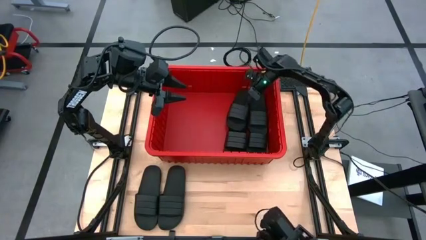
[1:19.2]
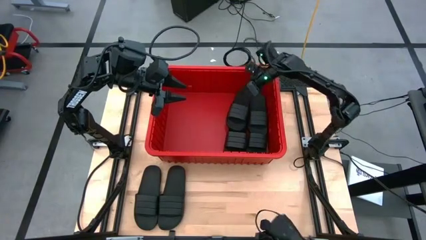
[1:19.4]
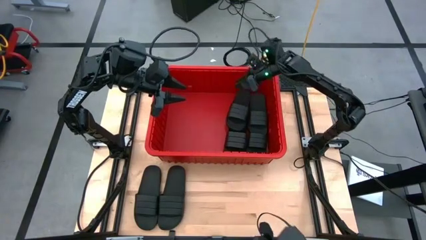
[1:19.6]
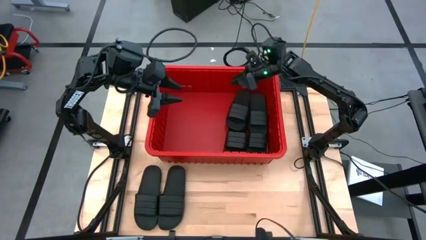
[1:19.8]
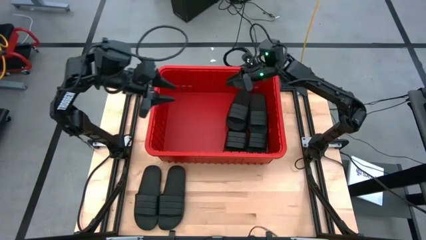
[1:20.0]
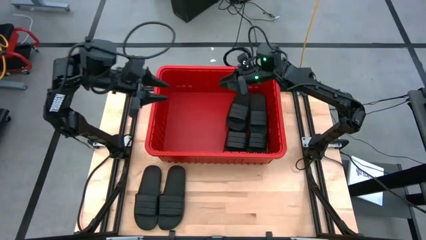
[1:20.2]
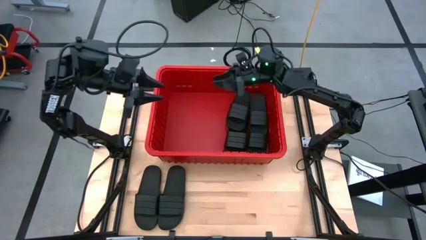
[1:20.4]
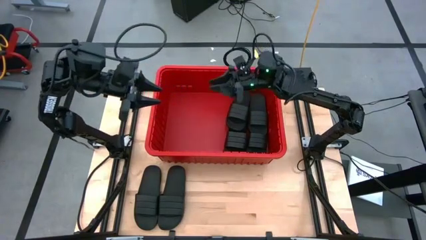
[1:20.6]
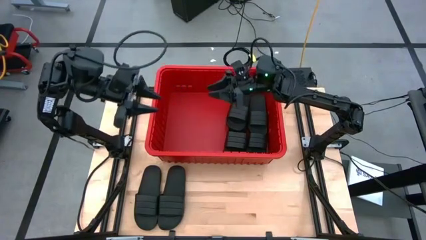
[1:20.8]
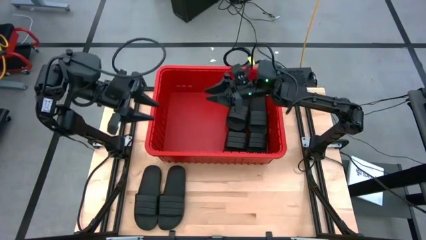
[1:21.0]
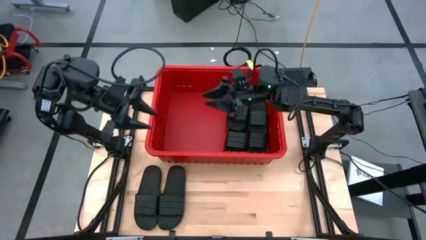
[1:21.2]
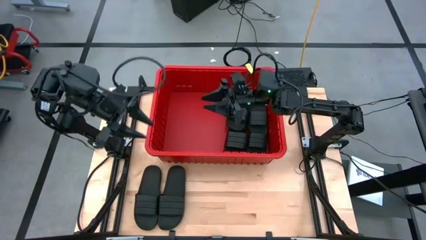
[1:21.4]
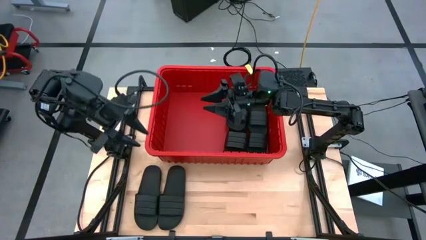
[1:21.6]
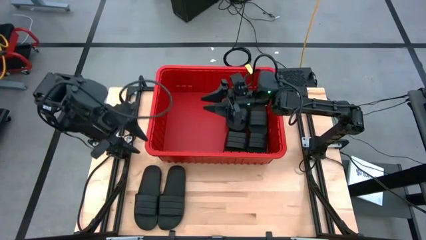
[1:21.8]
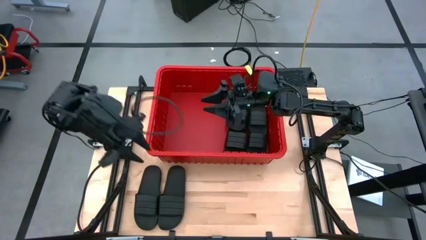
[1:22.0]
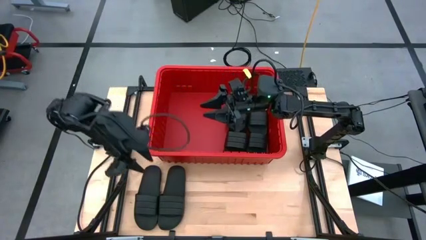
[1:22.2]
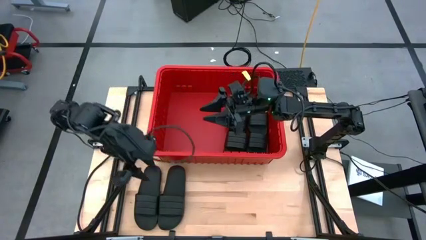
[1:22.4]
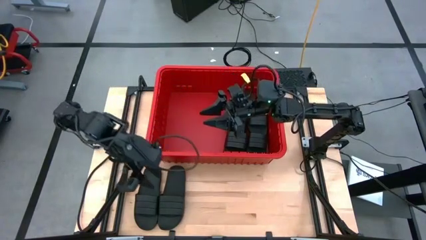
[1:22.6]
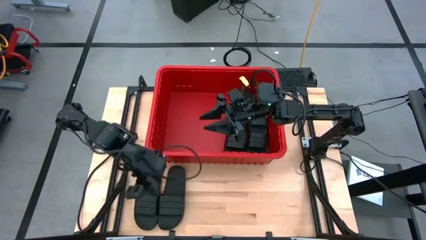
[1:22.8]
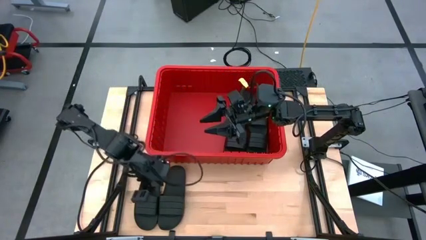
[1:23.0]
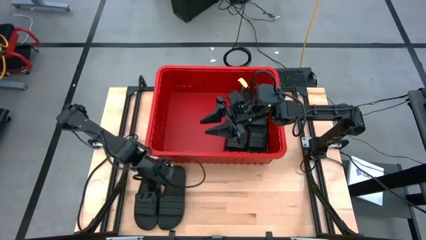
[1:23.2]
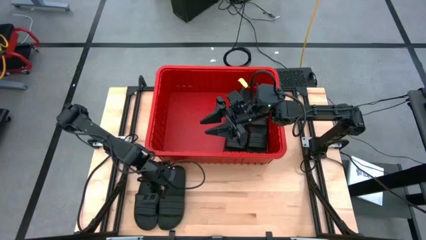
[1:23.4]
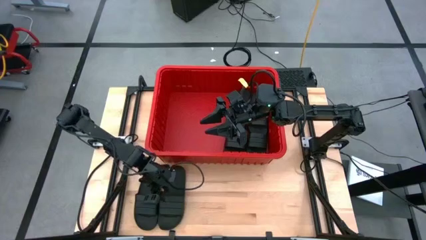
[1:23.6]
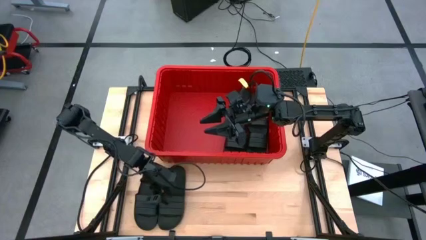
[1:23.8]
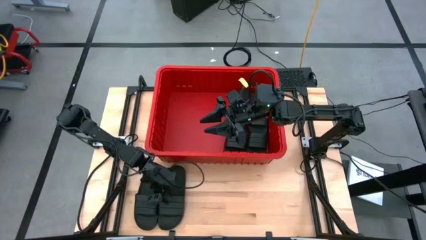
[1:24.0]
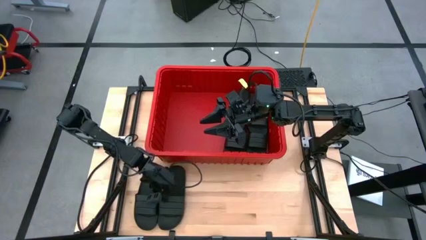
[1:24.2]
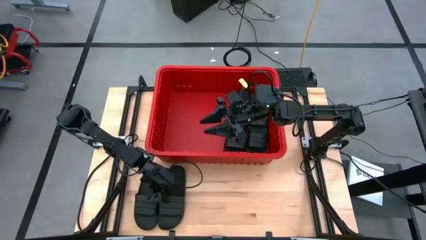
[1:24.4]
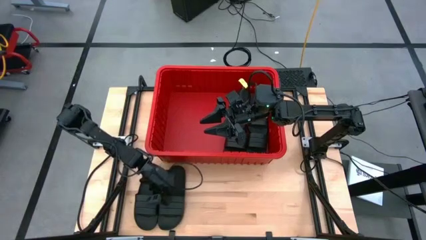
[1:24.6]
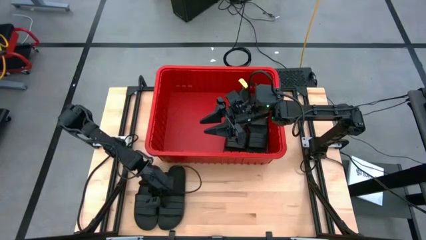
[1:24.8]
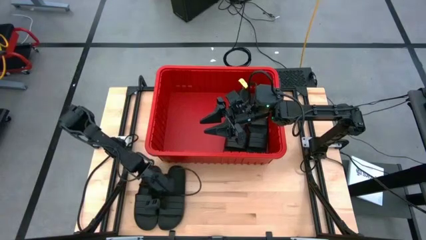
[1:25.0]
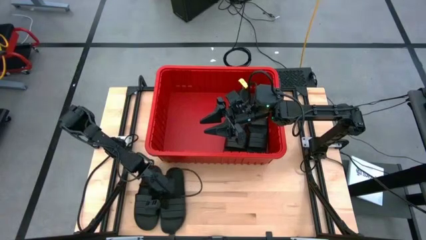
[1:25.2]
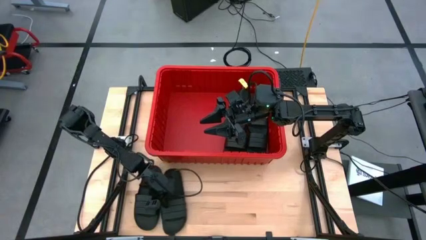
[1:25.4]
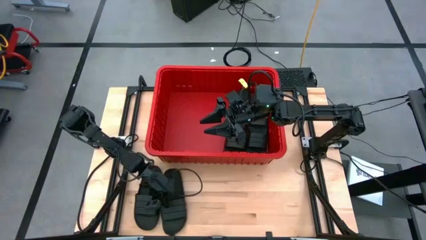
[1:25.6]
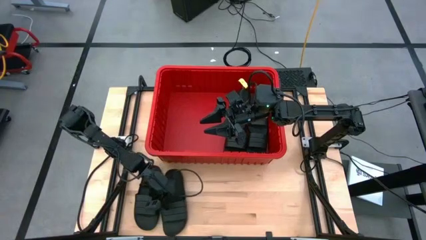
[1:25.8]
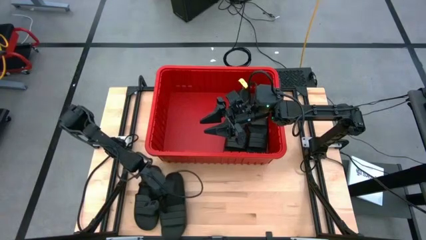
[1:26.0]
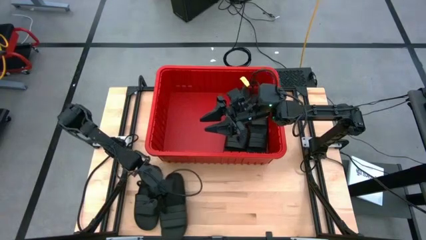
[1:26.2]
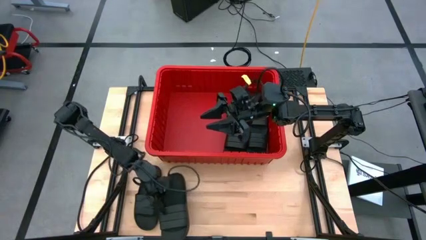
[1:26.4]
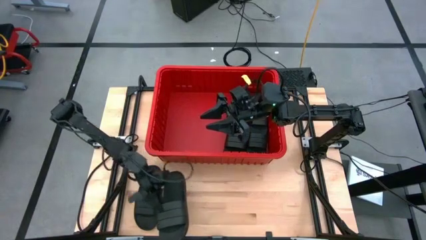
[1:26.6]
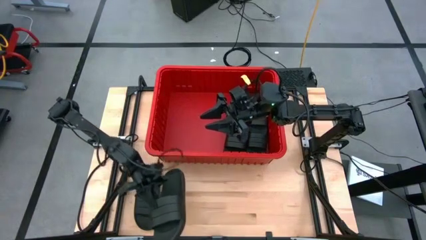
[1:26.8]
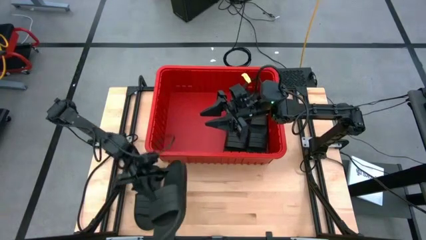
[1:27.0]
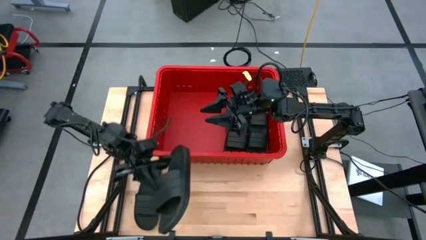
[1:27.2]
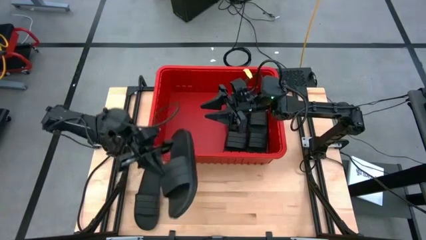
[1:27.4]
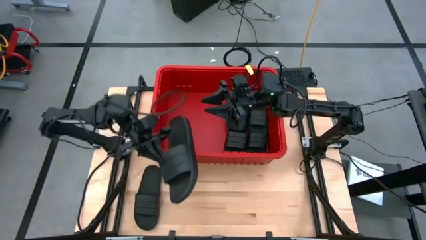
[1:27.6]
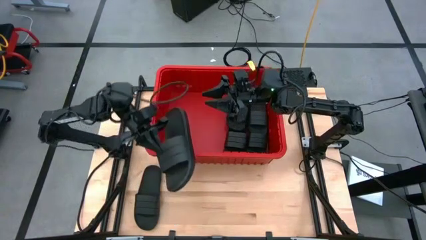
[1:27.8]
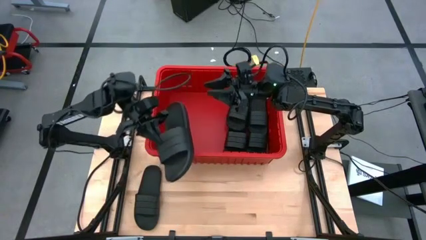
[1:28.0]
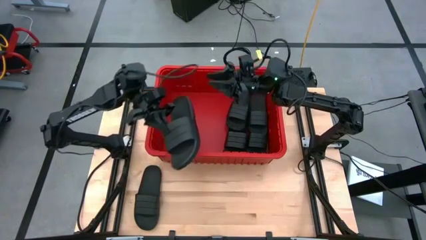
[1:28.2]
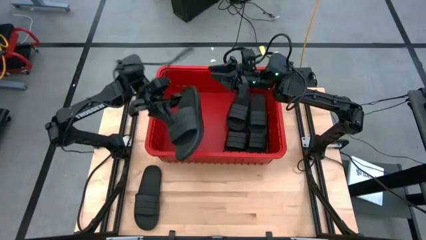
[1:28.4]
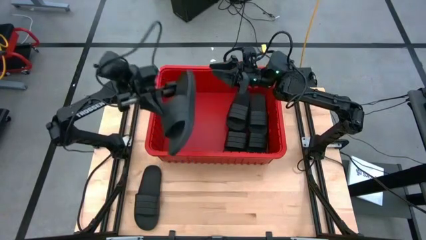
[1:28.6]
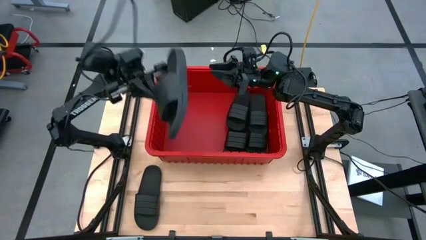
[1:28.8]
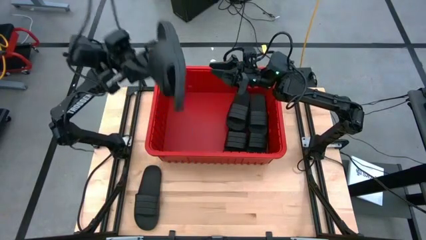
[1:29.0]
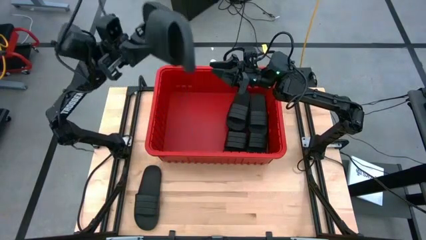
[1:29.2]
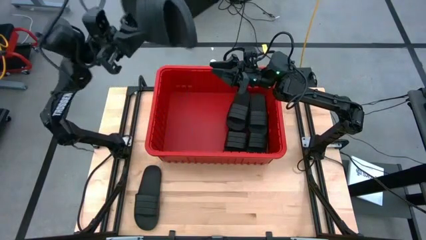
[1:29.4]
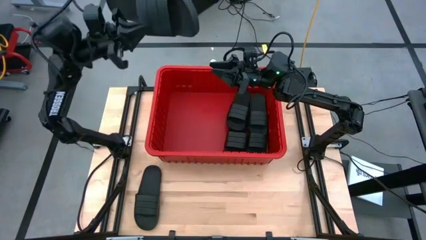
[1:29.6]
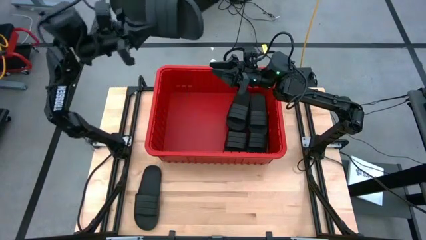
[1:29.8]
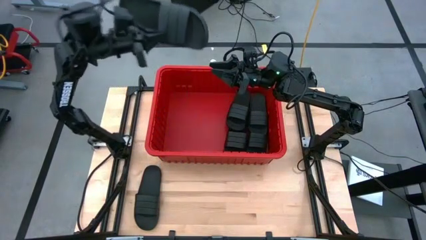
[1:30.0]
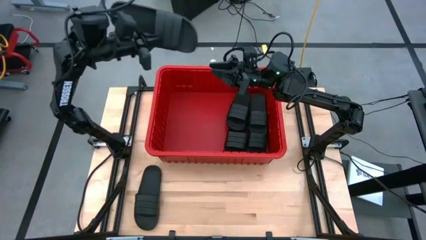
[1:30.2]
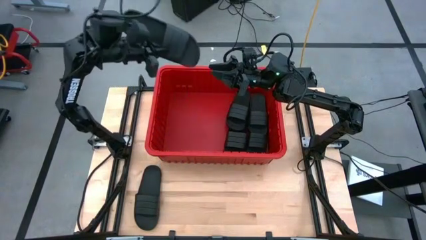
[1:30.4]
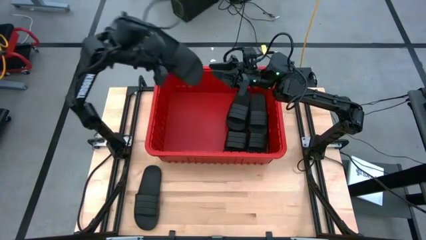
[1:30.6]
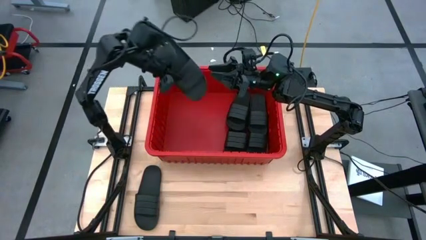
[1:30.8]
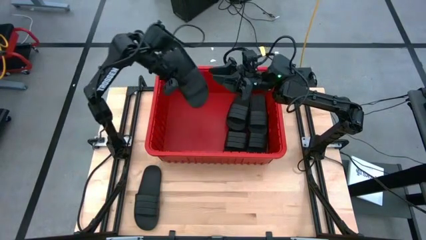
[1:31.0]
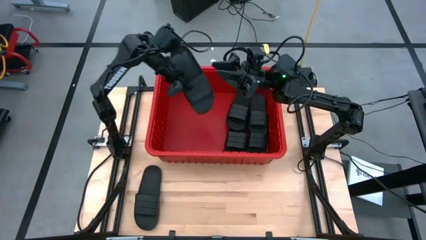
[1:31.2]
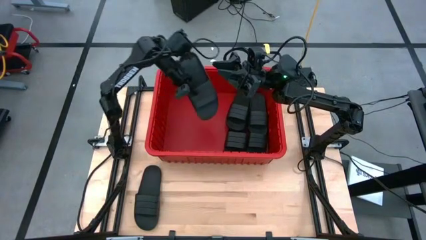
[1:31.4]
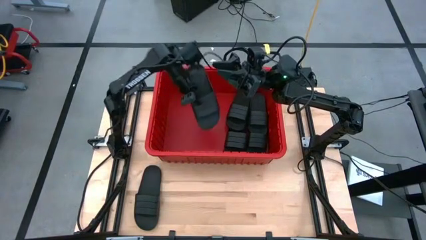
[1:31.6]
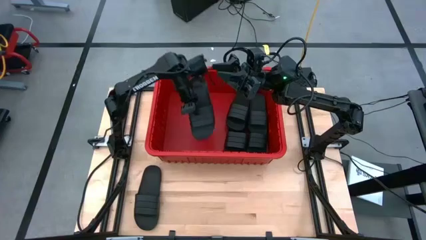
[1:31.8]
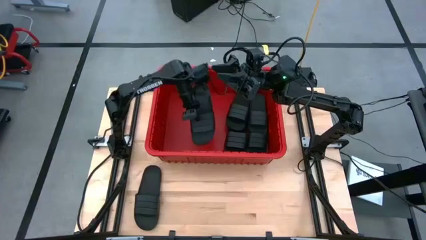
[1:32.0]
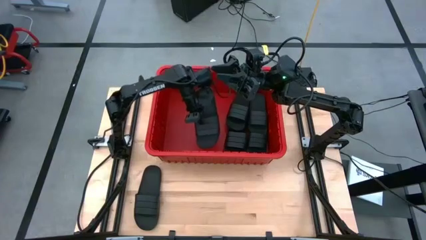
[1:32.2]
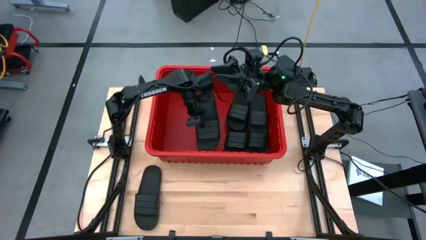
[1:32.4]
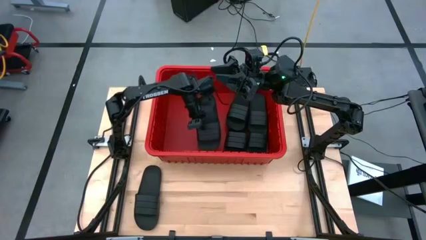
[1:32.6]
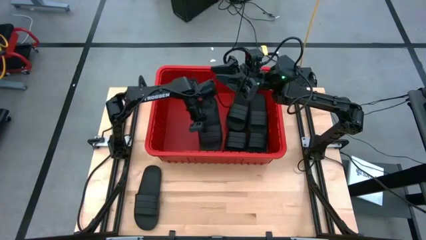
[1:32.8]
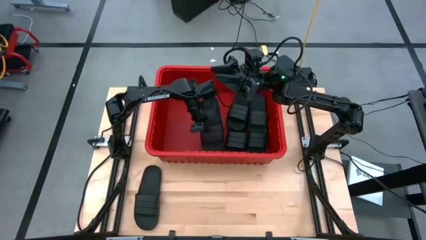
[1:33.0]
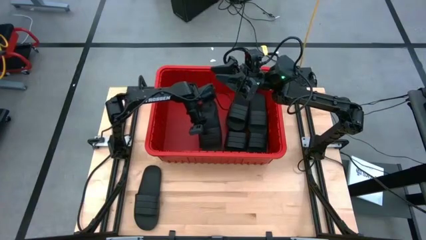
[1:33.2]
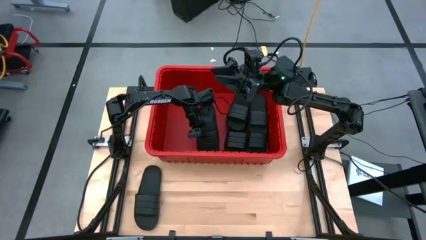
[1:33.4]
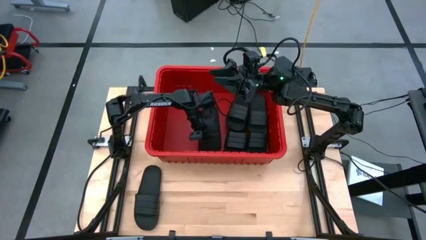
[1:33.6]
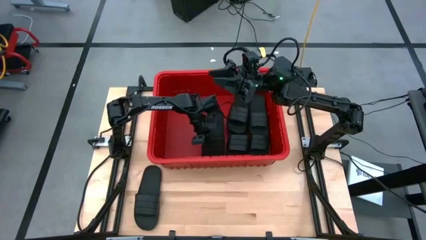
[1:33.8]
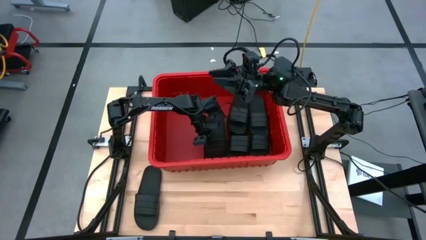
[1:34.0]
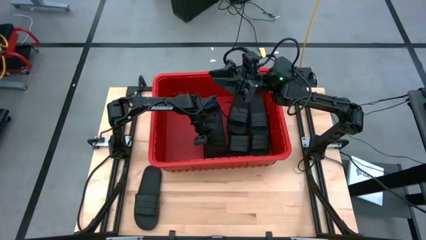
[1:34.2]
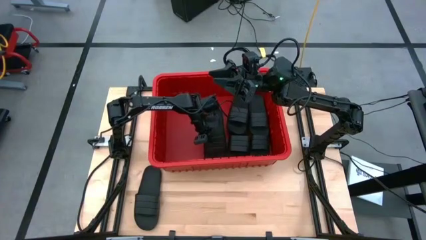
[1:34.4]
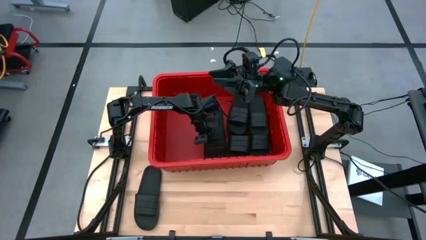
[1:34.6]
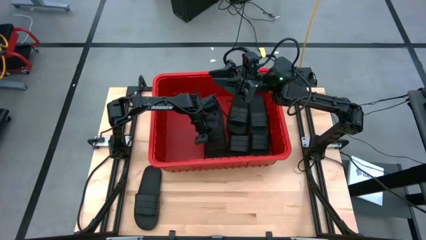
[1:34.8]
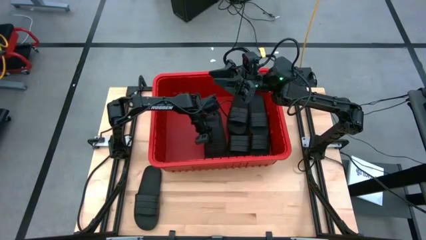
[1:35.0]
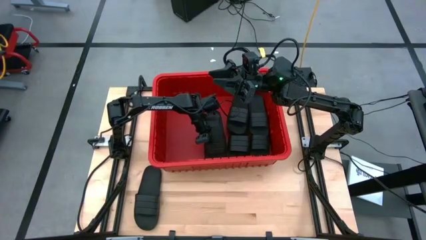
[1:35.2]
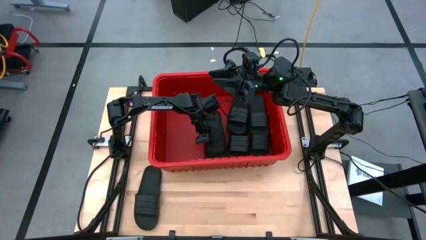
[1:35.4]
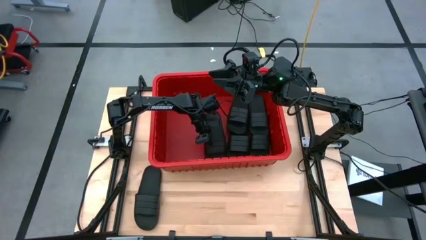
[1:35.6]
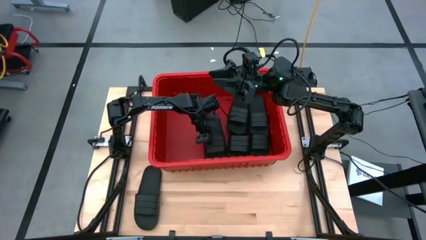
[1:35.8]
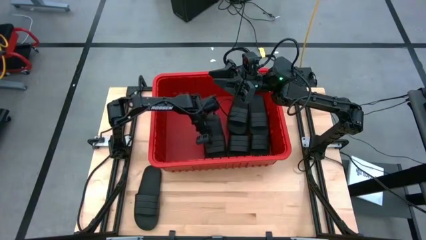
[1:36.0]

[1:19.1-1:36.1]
Task: Pick and place slides into bin
Put the black slide into the red bin
